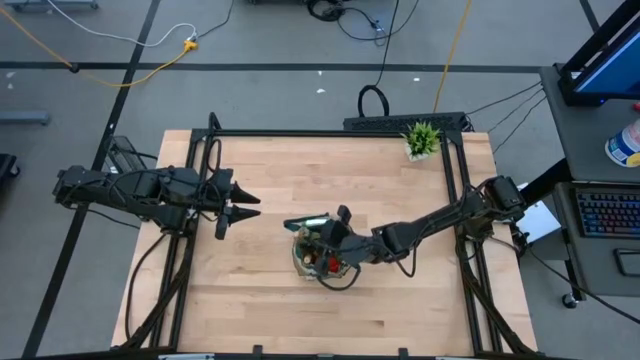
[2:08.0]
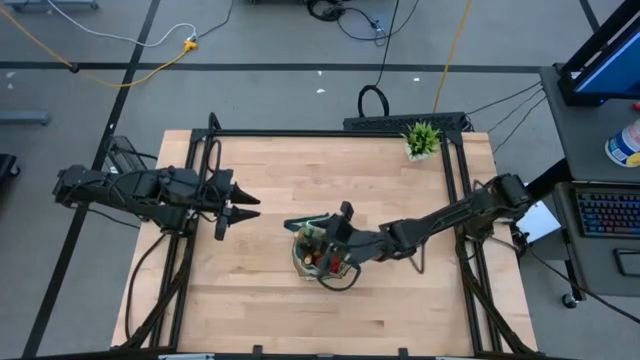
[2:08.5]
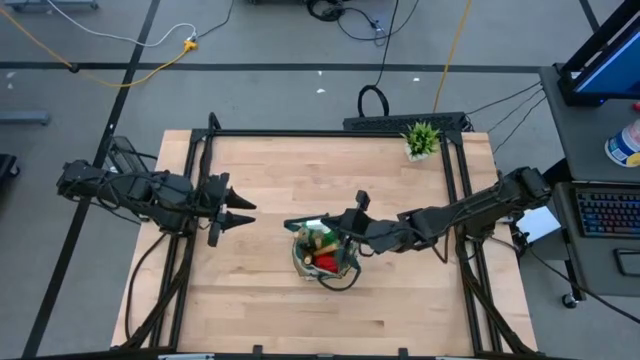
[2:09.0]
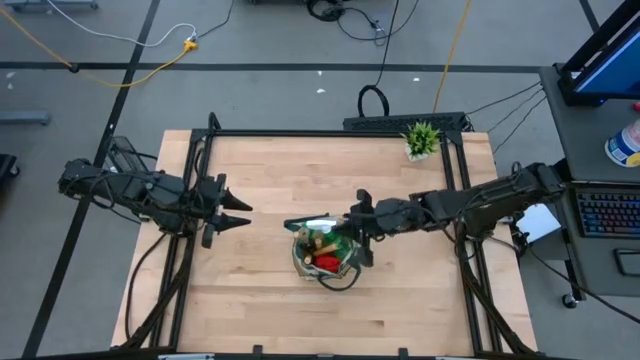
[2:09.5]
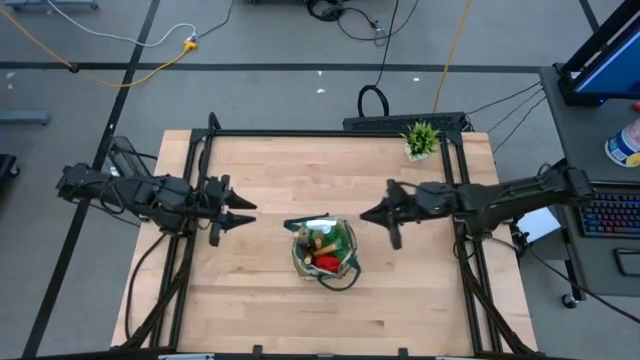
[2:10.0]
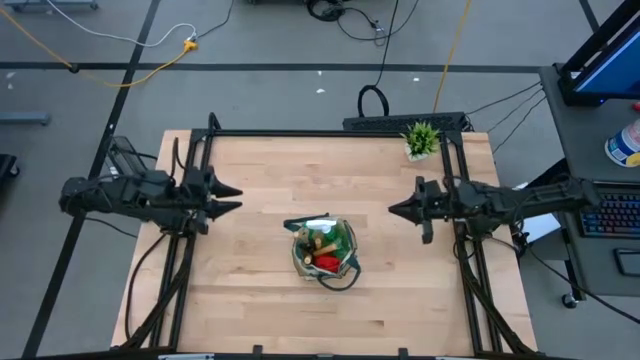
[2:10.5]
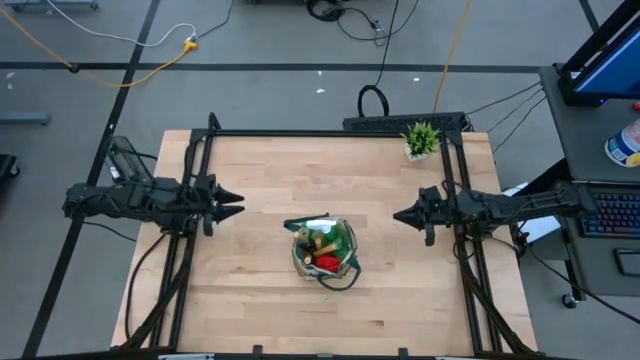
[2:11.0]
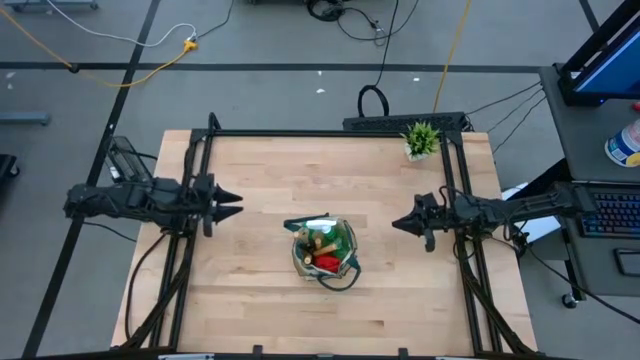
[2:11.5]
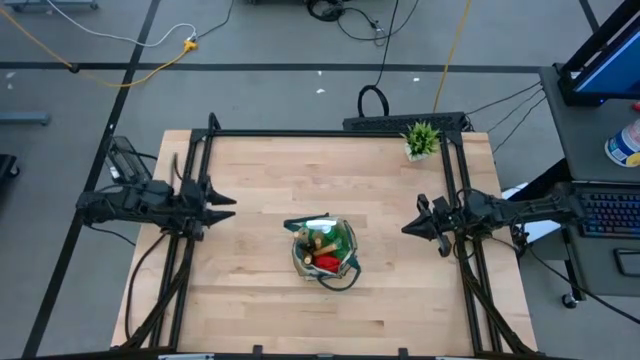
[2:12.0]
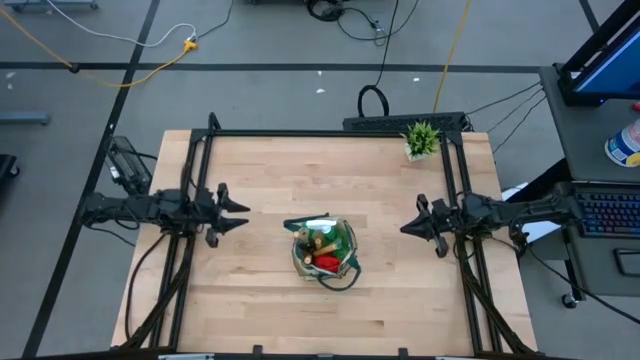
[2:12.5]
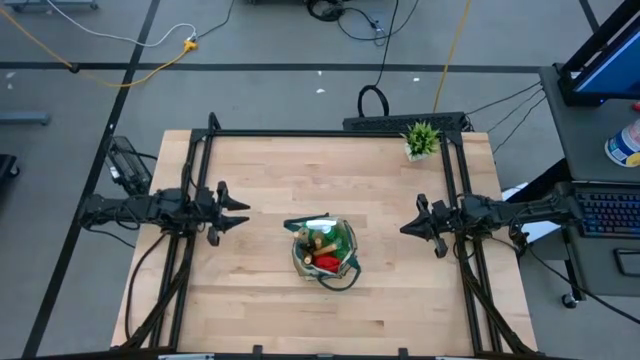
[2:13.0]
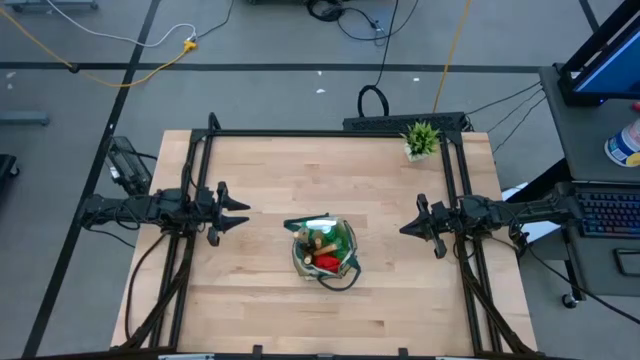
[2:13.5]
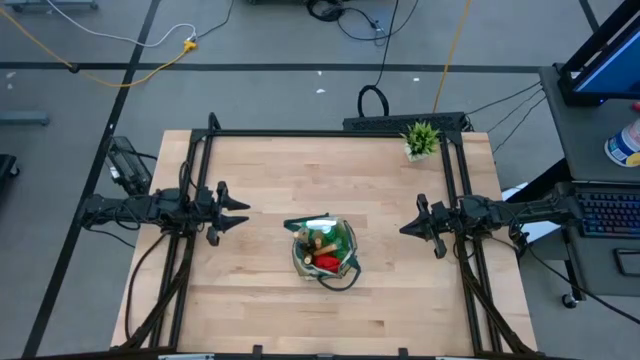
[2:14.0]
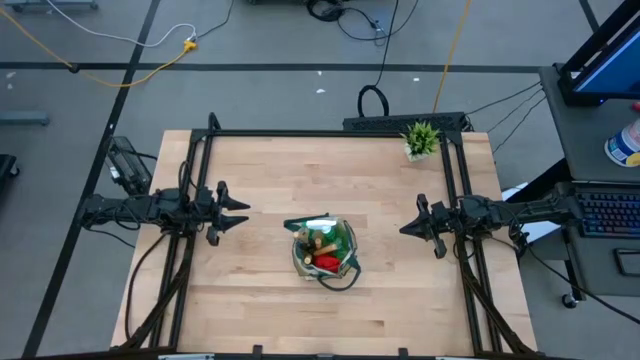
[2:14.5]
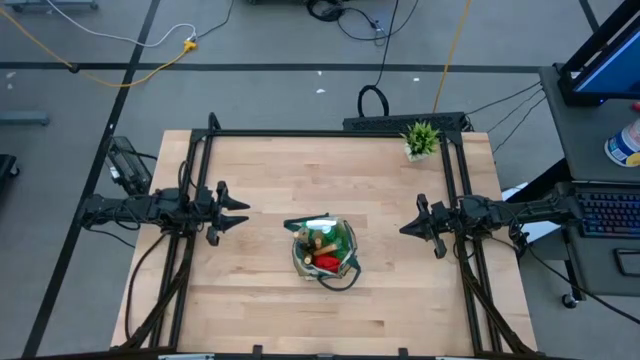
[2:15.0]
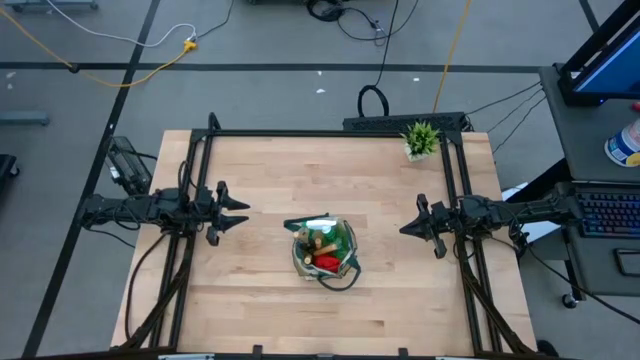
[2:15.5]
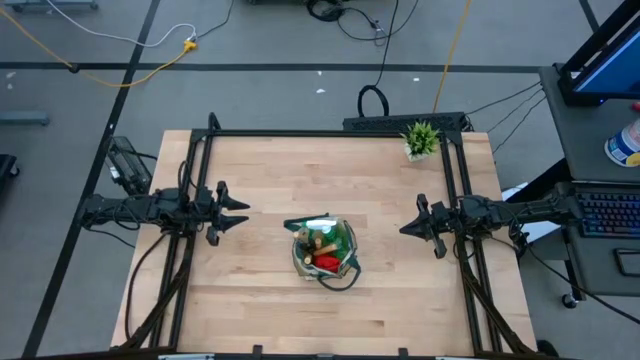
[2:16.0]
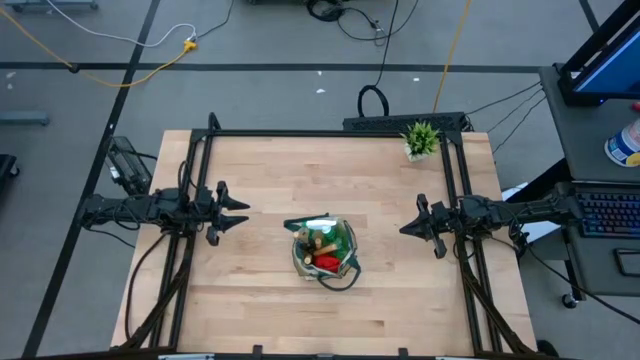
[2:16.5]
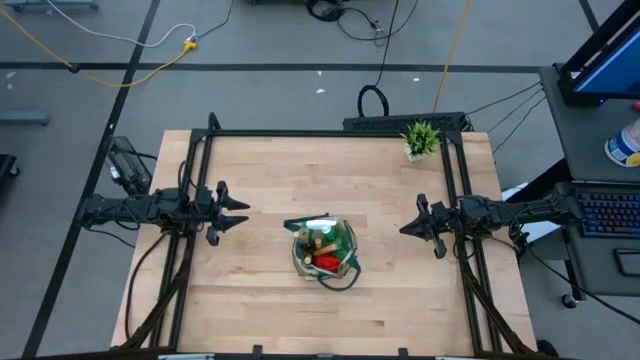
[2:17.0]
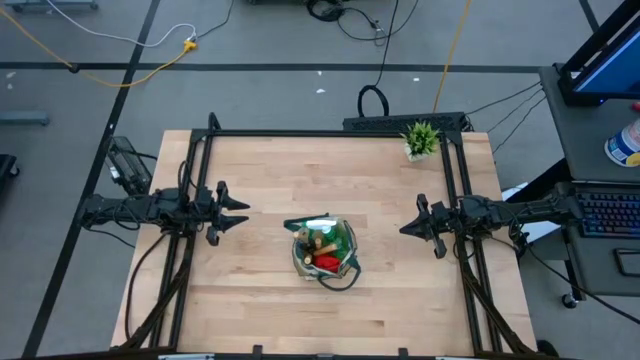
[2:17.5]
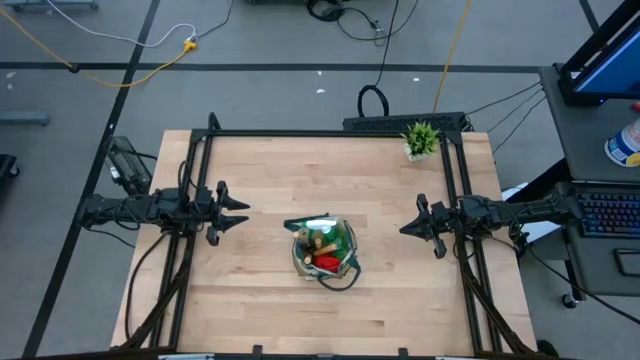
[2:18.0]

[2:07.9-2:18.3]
Task: Pick & Place Garden tools in Gardening bag
Return to Home Position

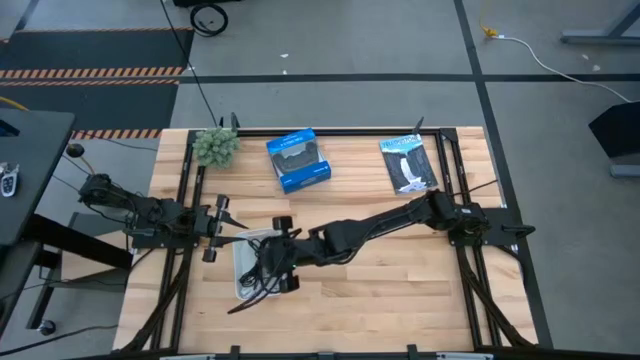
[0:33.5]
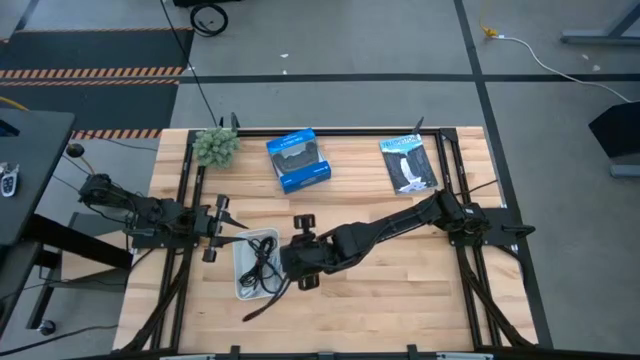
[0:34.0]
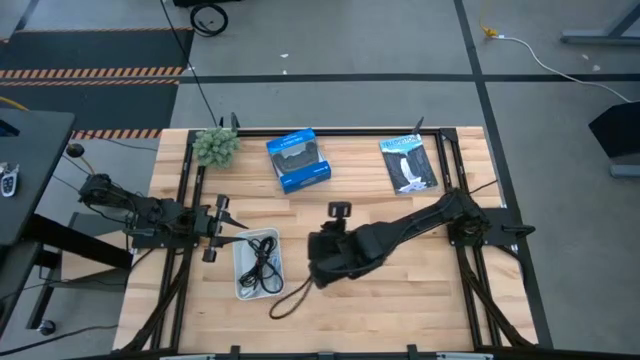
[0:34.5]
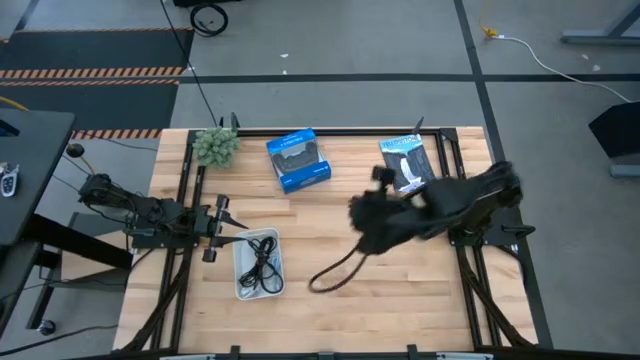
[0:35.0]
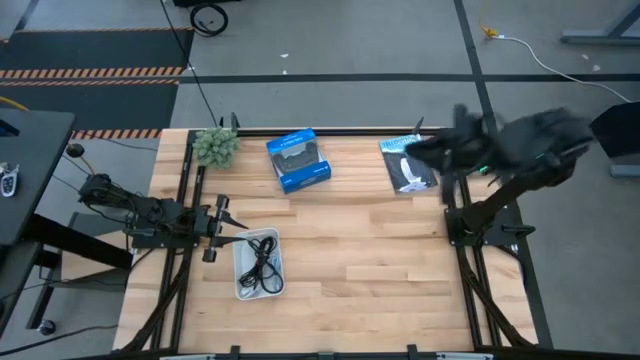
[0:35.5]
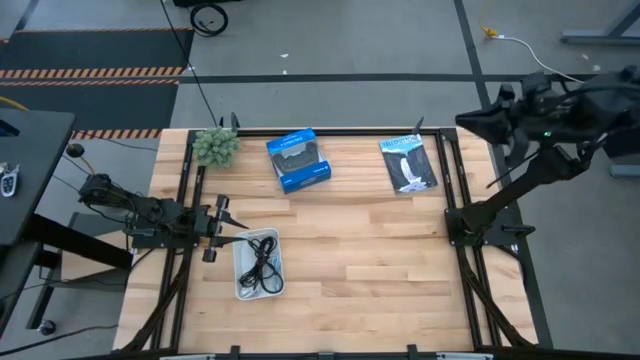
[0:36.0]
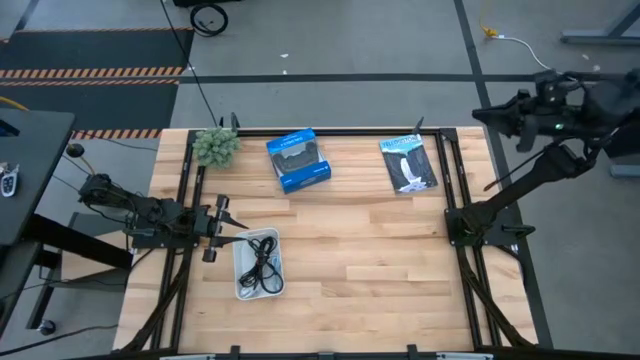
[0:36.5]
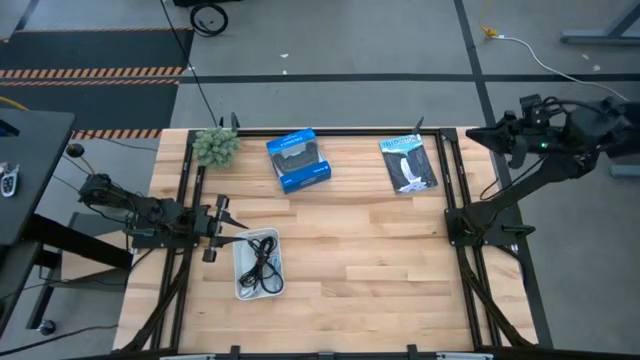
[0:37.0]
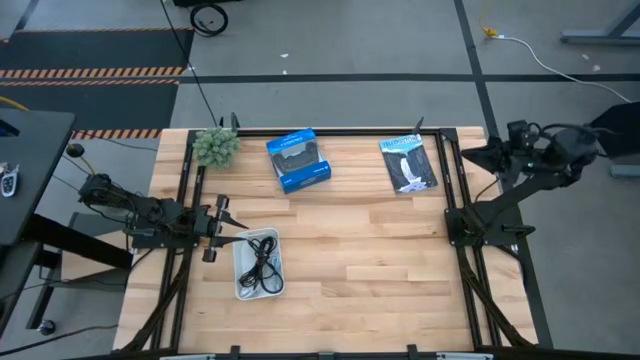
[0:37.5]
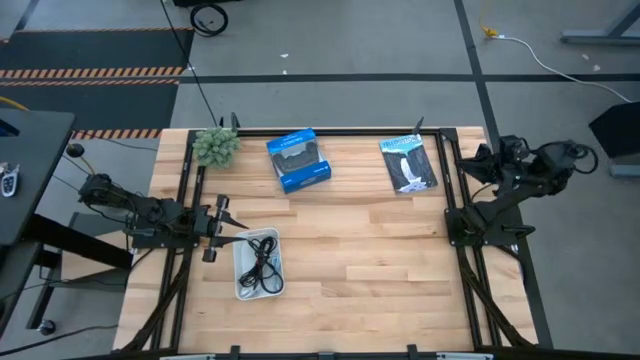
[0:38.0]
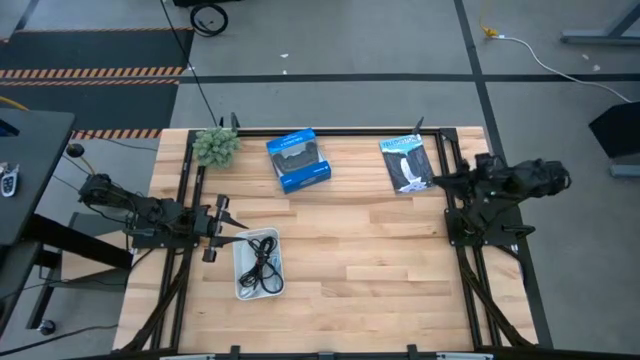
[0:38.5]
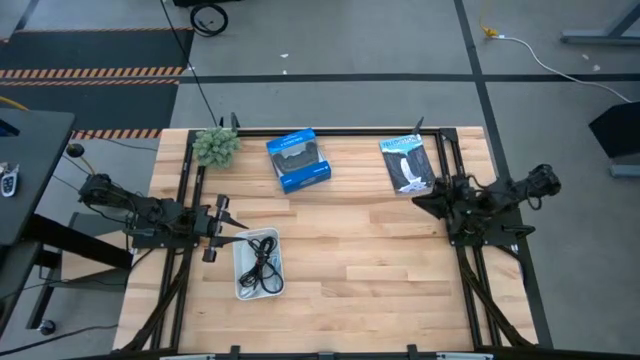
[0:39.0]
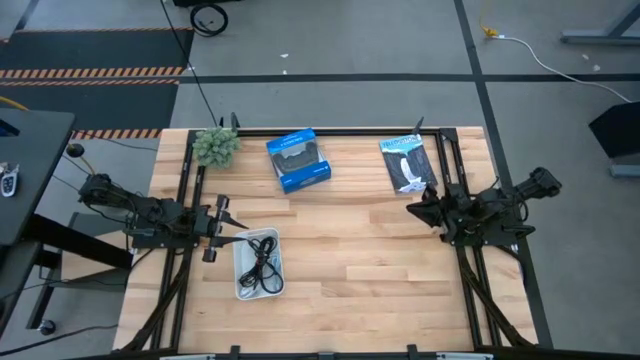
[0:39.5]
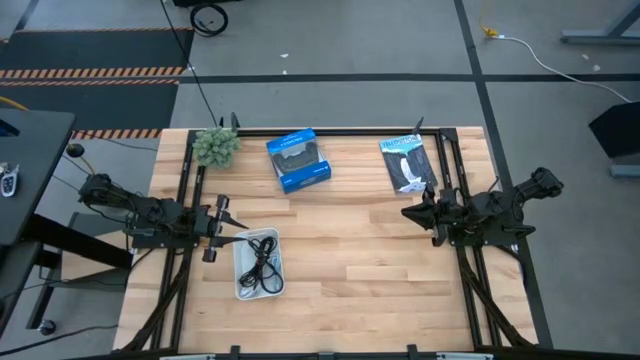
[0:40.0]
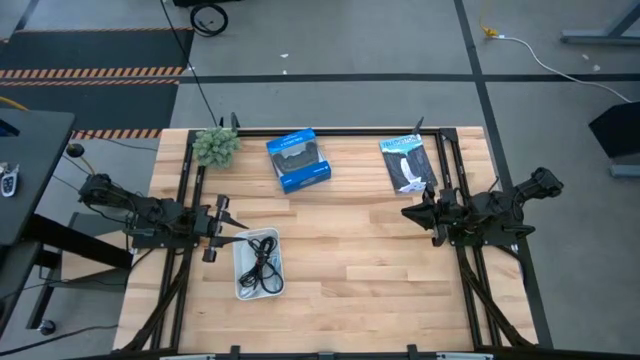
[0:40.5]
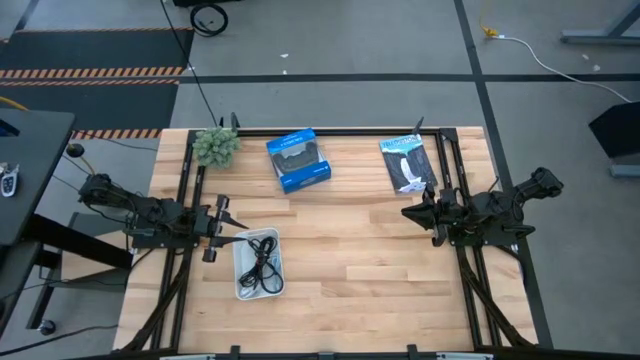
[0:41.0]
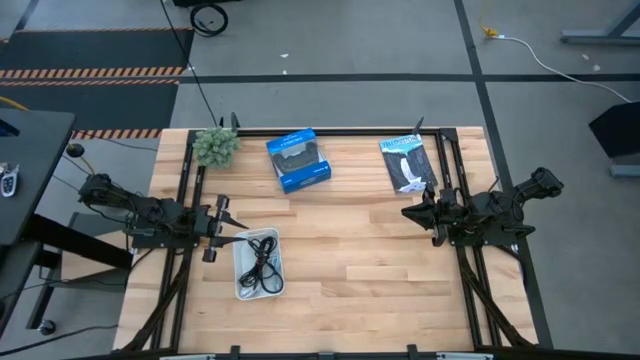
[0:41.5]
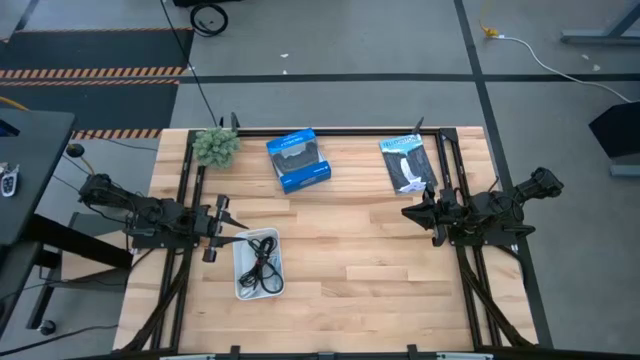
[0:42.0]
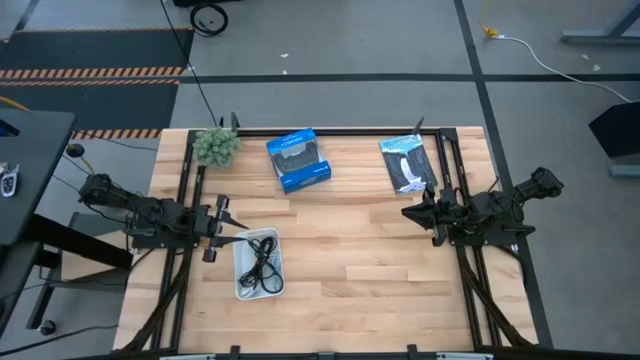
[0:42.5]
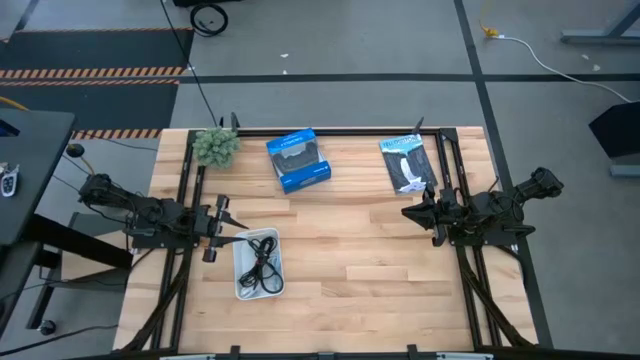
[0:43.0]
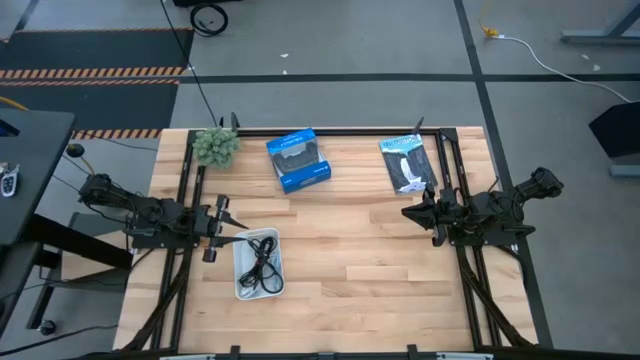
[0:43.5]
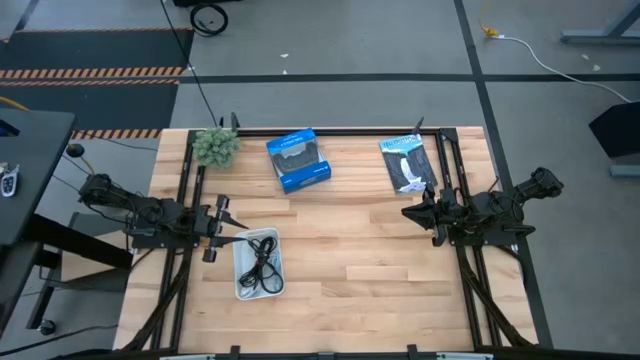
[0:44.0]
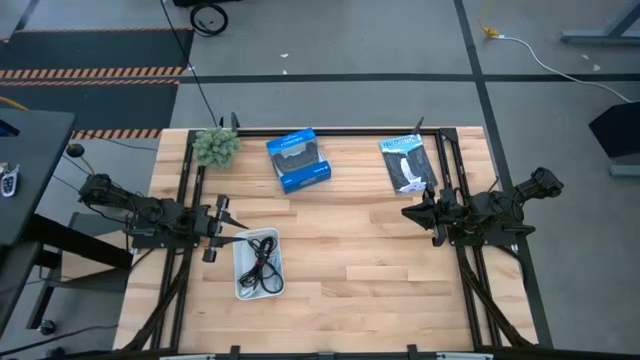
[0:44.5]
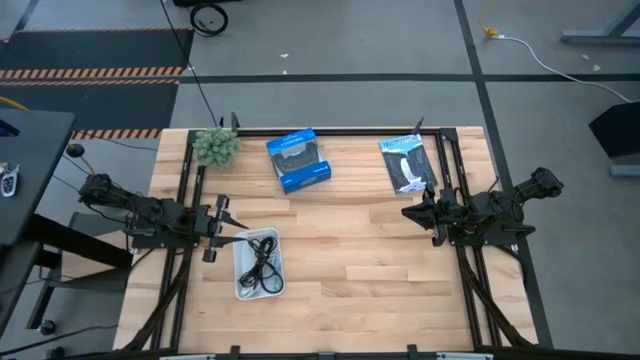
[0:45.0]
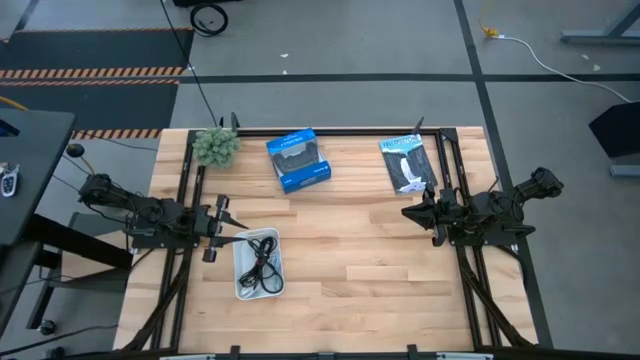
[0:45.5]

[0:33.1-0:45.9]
Task: Pick and place USB-C Cables
Return to Home Position
